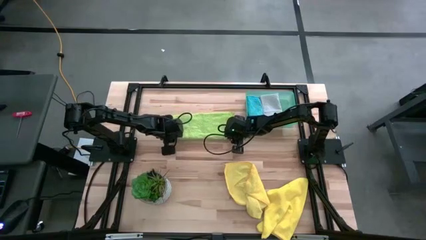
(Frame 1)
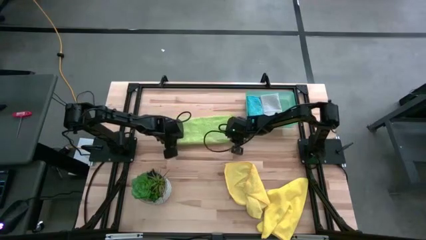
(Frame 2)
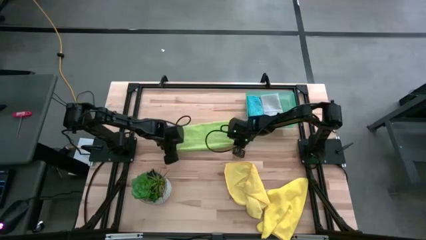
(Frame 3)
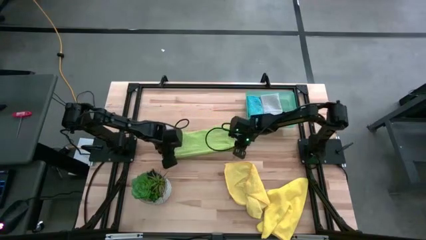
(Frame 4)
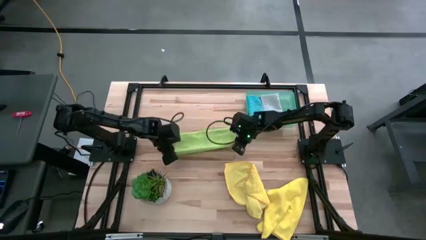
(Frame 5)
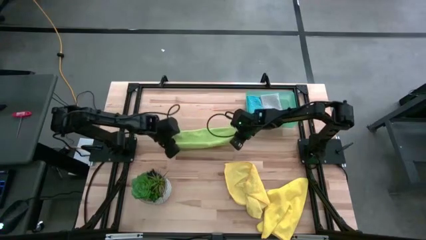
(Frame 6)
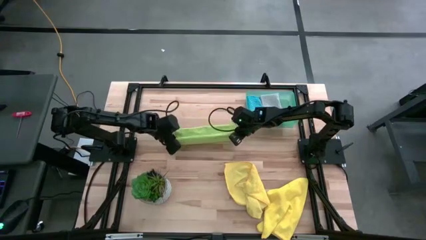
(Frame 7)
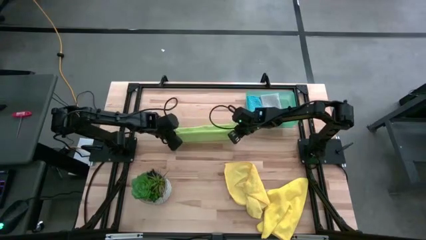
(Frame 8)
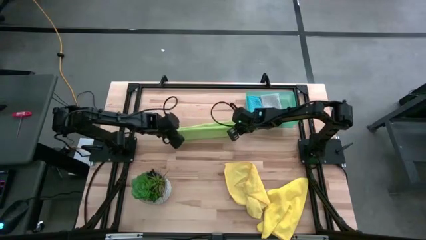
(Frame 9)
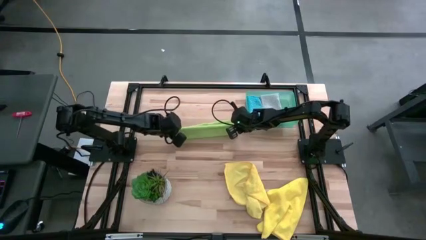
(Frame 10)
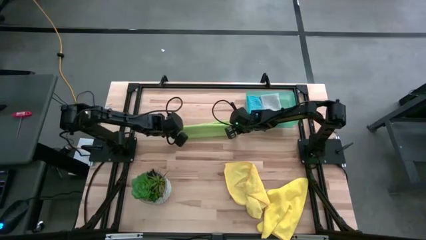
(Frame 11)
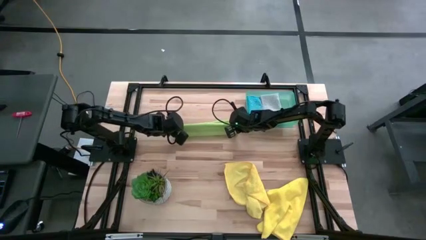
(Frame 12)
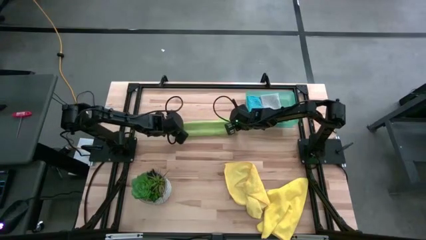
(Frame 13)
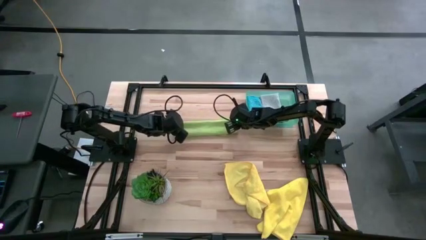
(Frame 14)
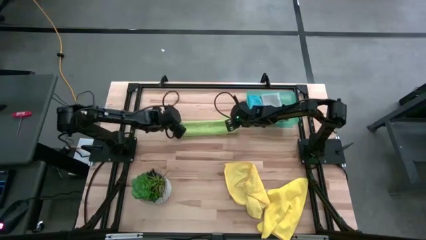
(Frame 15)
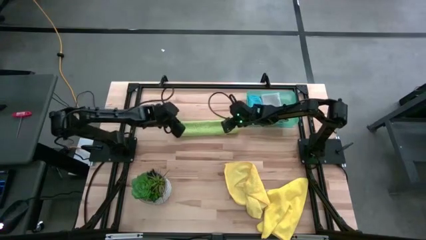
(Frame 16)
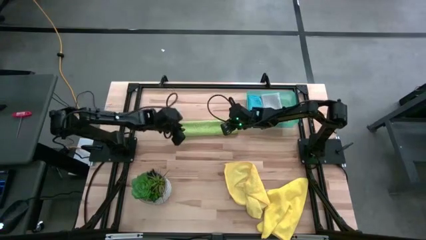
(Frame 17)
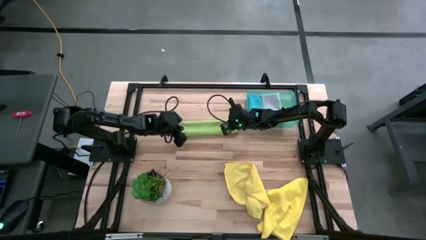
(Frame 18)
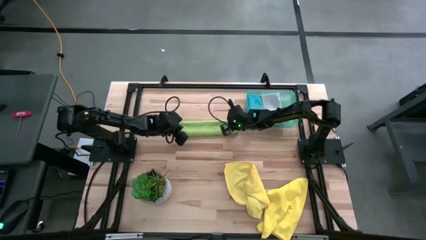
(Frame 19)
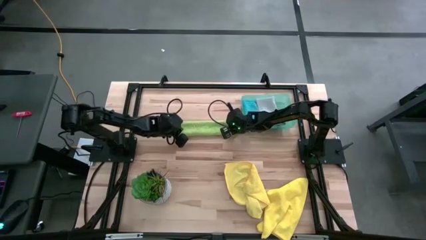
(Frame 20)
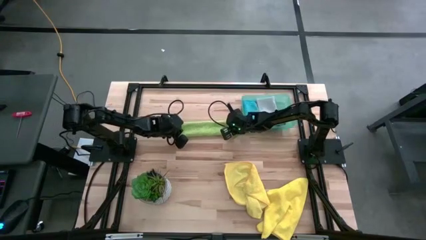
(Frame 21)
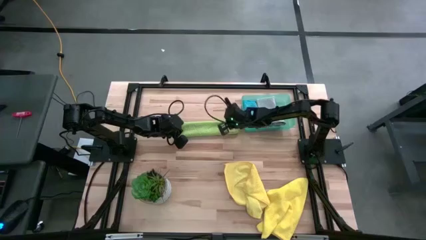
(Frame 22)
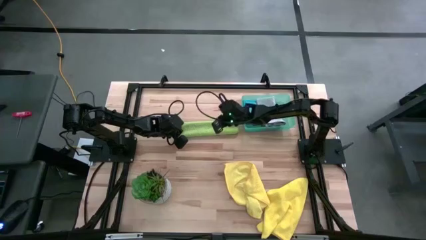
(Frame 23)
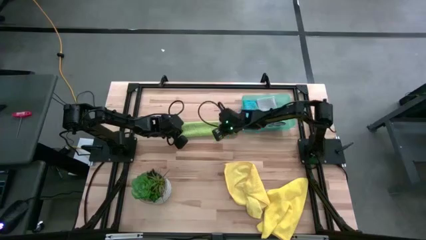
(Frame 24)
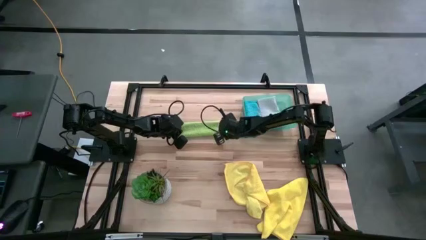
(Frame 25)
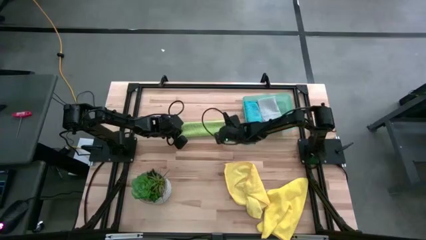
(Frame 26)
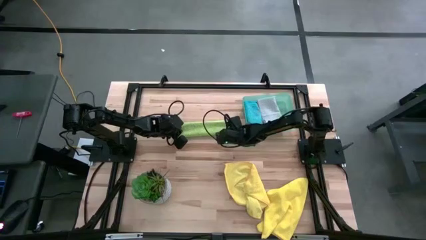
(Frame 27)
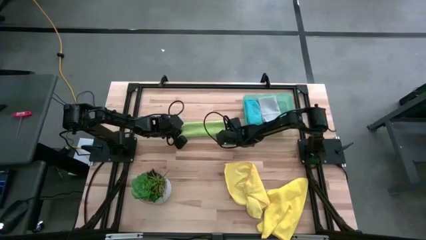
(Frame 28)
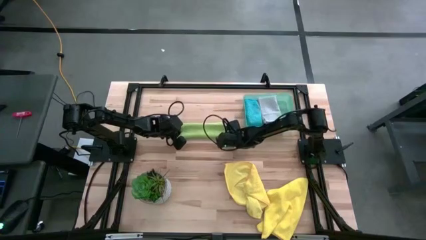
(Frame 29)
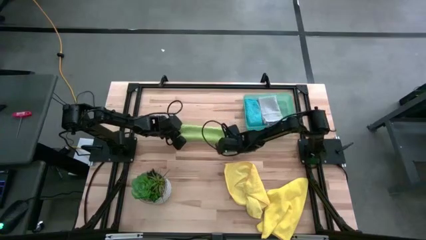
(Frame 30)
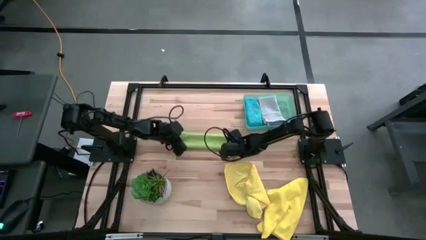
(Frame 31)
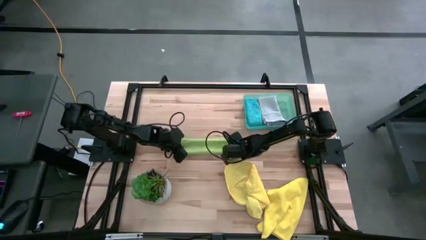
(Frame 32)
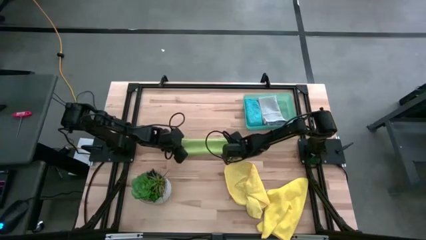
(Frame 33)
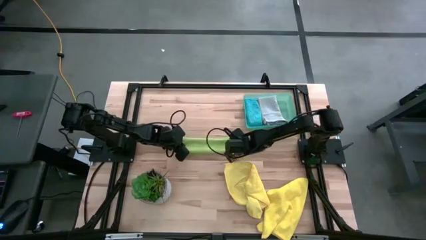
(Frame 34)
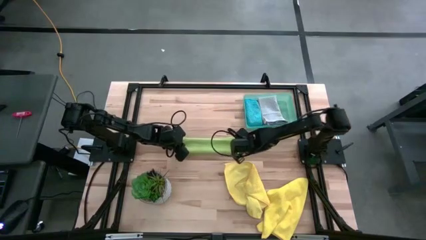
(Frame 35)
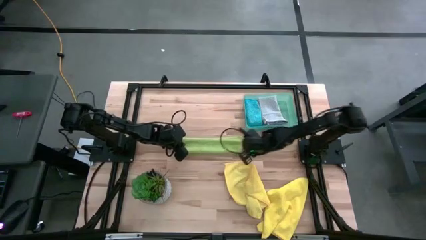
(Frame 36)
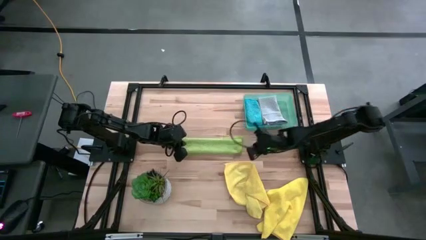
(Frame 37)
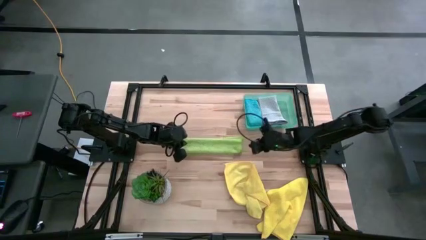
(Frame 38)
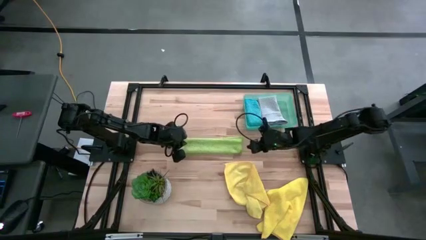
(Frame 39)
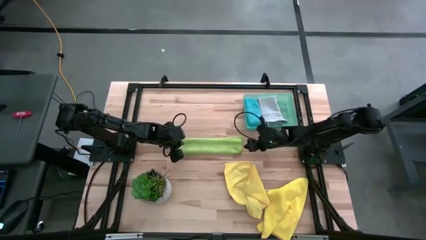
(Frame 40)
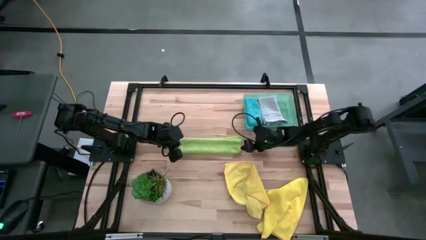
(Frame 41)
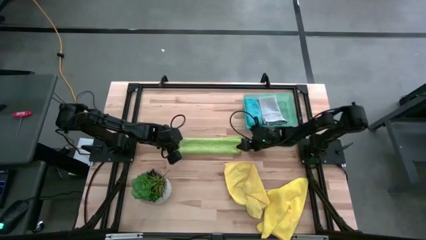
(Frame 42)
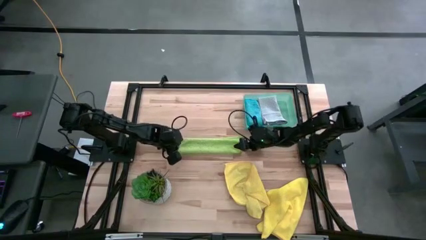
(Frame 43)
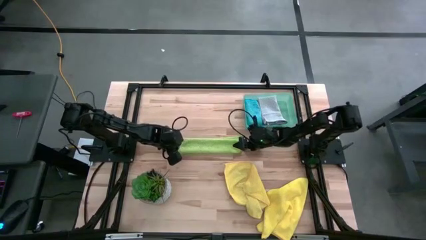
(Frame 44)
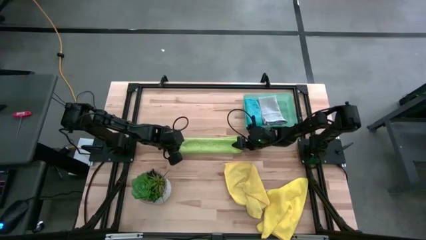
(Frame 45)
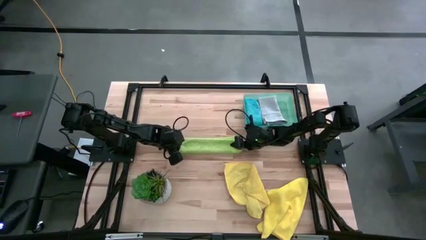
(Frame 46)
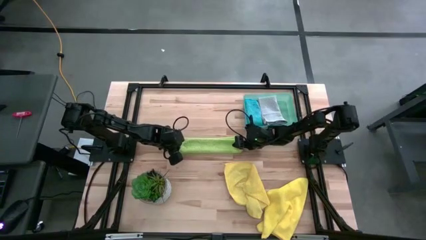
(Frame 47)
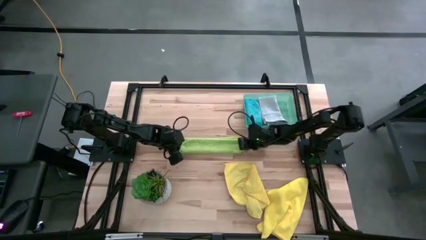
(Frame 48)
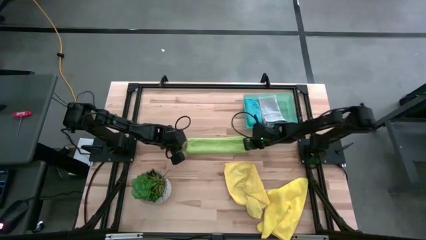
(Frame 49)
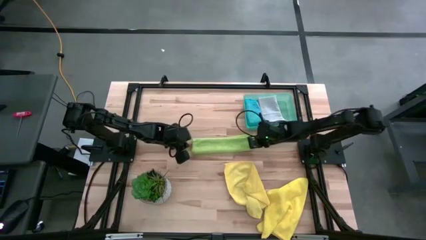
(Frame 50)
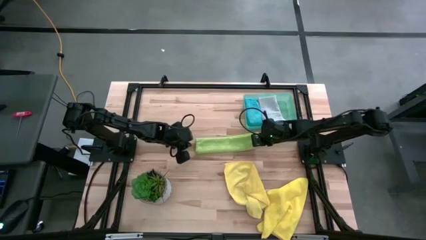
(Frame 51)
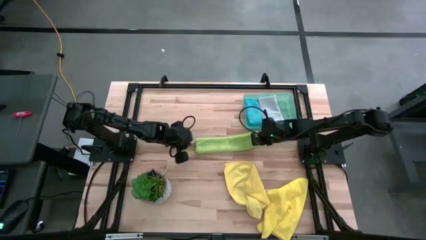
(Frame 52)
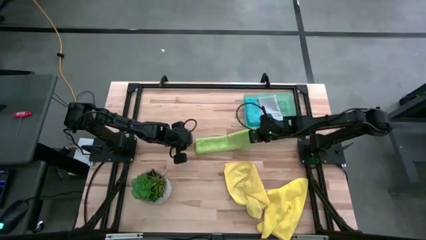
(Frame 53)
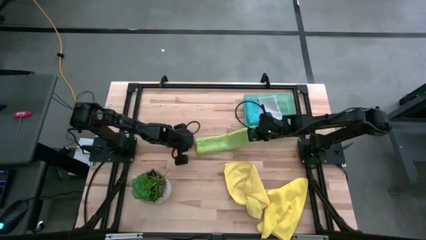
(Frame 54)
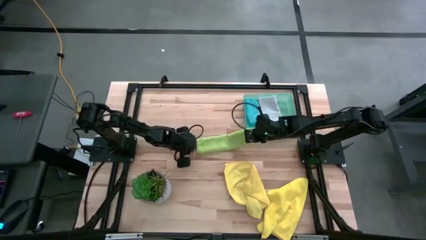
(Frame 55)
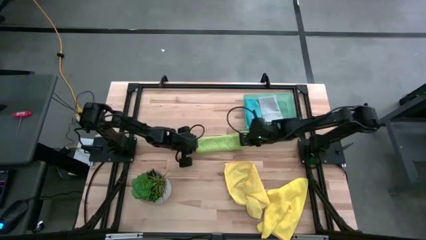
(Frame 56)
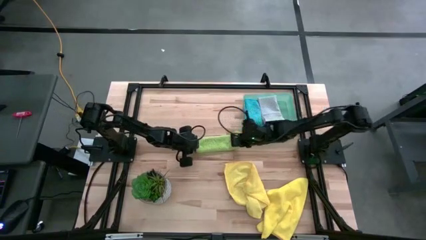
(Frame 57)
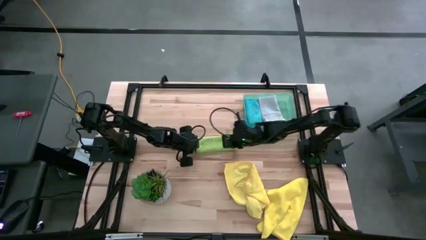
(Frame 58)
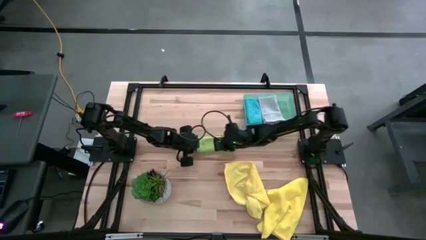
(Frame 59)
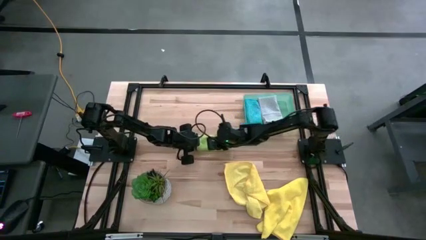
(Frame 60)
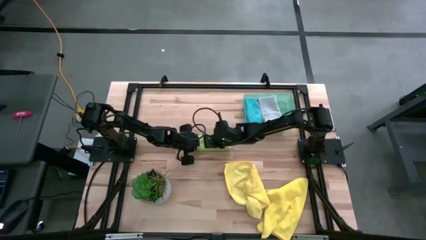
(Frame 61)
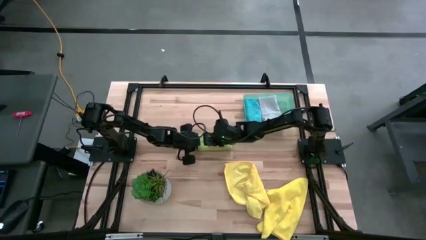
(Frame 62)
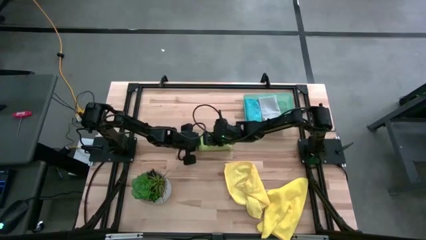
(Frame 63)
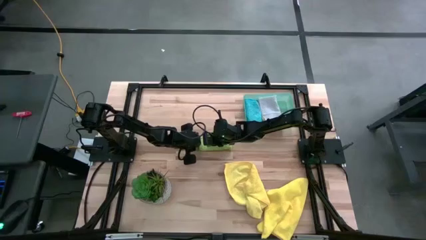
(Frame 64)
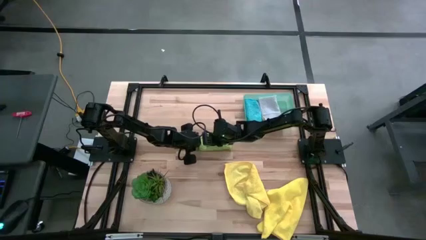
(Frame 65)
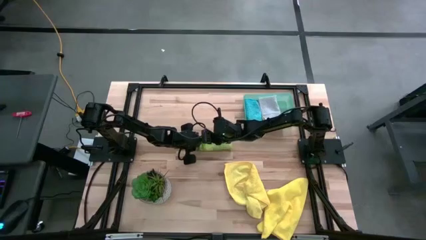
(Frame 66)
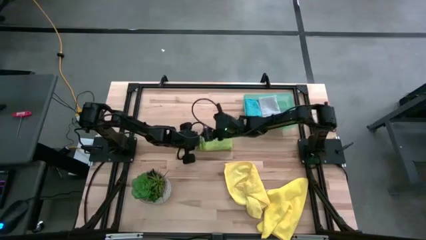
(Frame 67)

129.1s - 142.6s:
Task: Fold microfiber towels
Fold the green towel

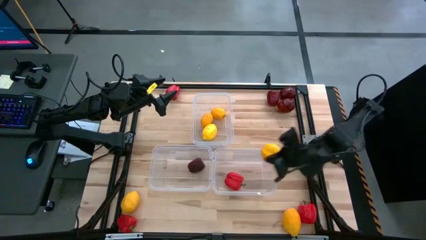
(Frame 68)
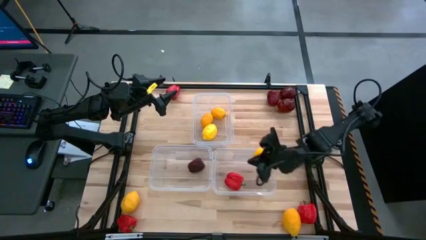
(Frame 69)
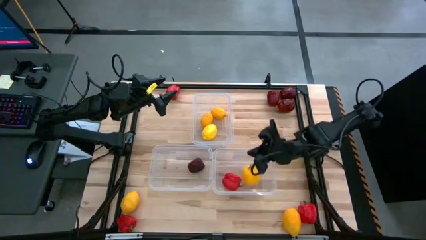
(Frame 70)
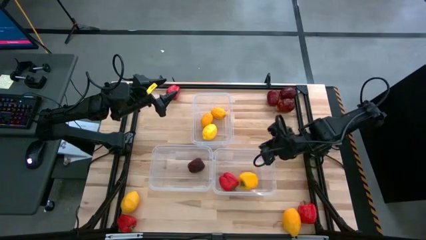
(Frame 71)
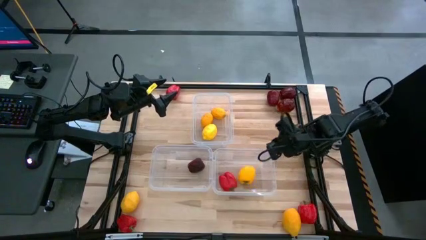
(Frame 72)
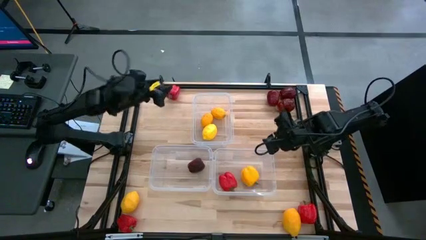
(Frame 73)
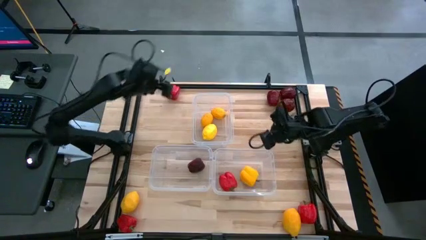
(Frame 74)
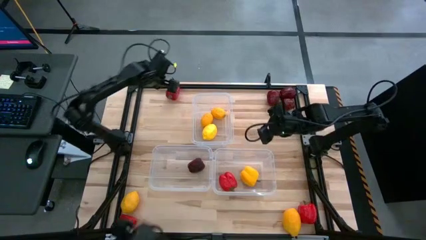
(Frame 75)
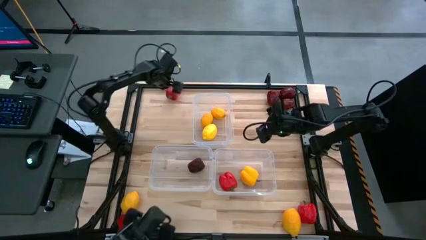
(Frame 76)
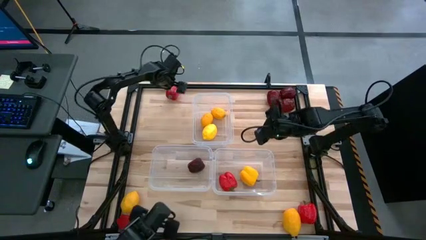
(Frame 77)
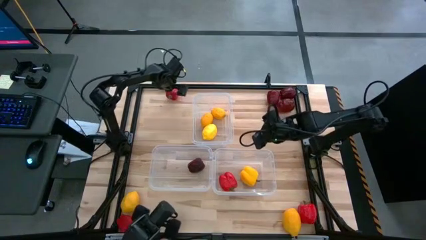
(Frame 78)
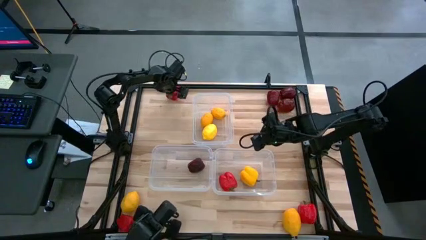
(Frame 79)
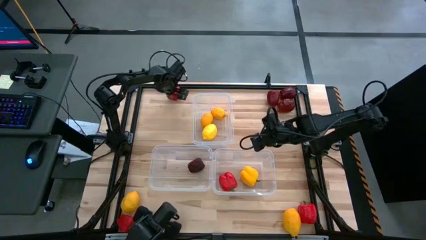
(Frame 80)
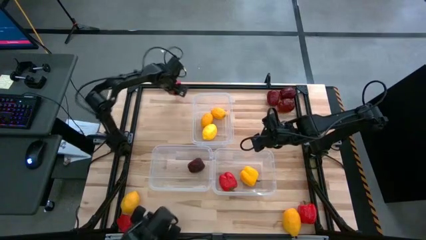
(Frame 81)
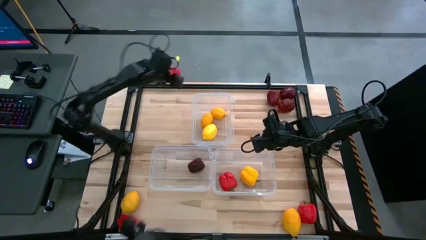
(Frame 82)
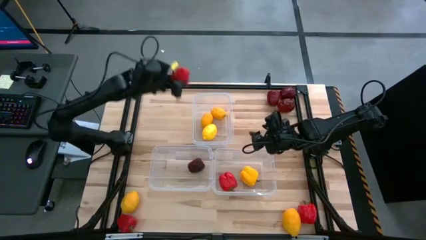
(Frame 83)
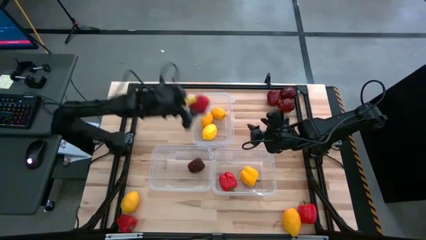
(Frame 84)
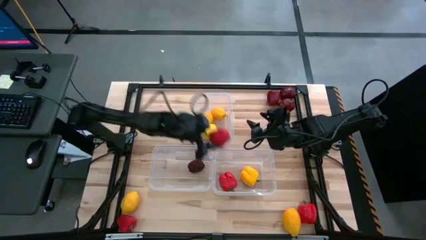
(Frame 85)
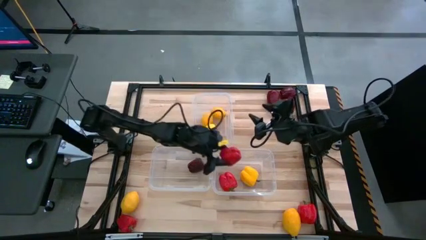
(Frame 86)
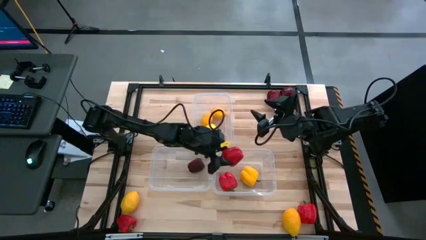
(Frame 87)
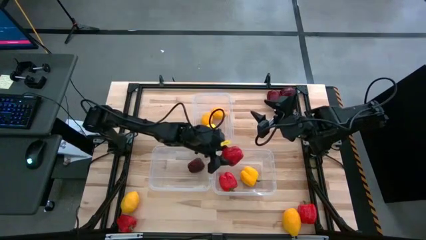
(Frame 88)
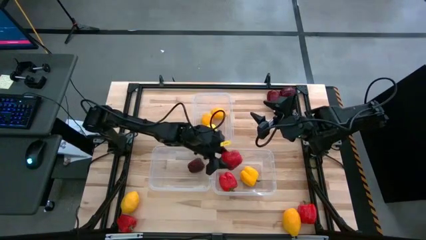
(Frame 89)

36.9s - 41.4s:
Task: Sort produce into baskets
Put the red bell pepper into the bottom right transparent bin
